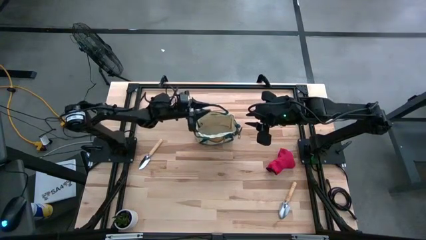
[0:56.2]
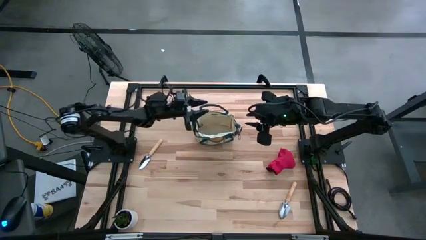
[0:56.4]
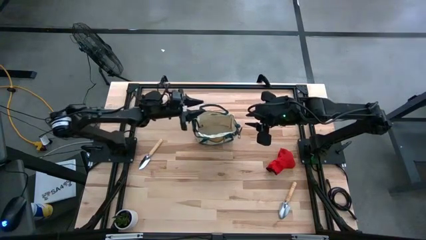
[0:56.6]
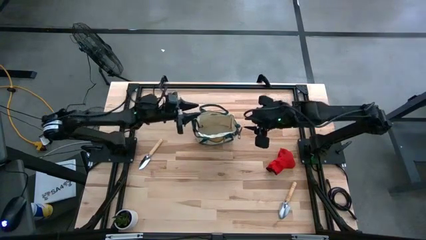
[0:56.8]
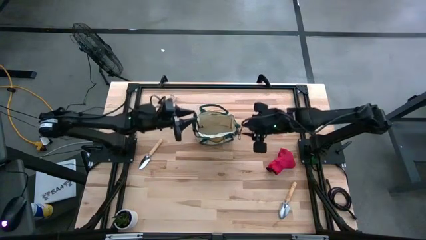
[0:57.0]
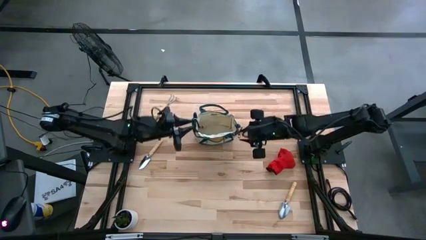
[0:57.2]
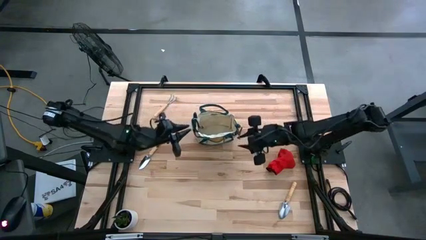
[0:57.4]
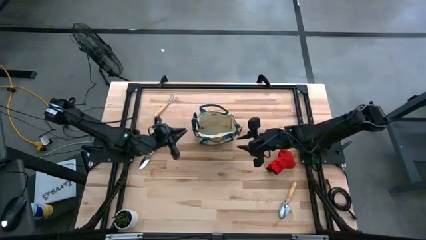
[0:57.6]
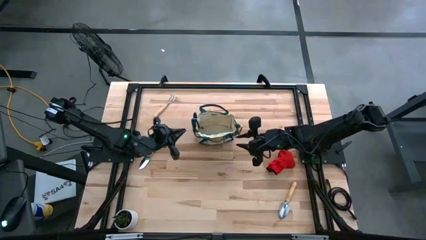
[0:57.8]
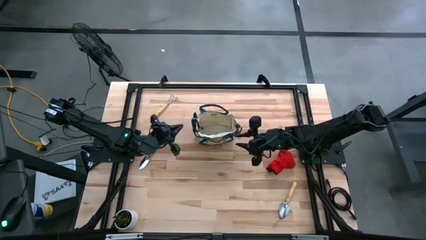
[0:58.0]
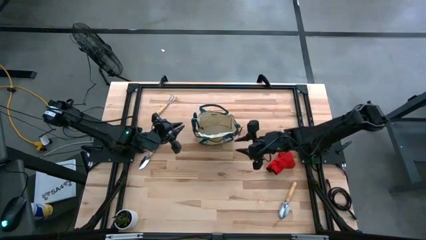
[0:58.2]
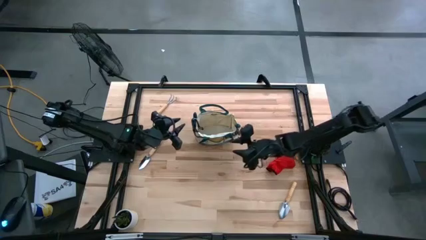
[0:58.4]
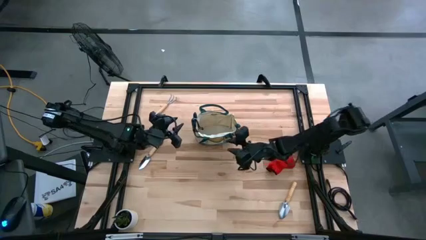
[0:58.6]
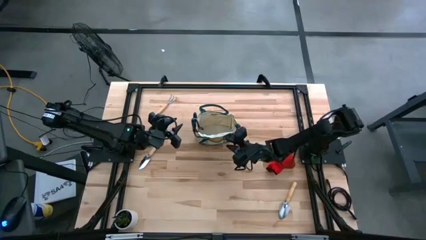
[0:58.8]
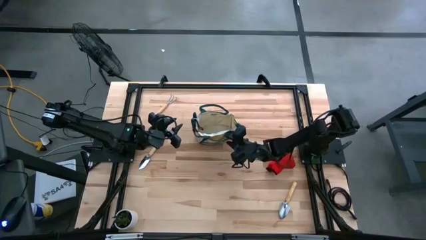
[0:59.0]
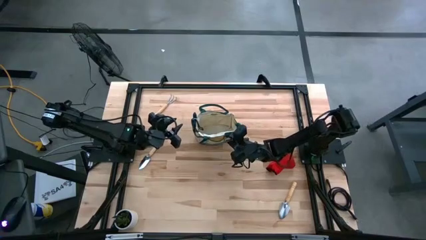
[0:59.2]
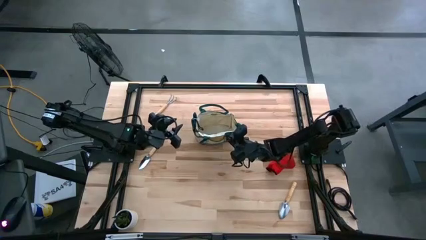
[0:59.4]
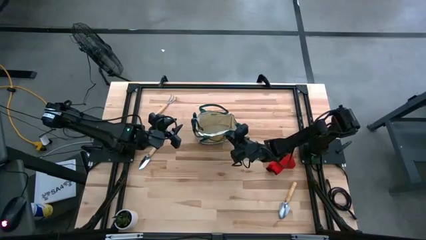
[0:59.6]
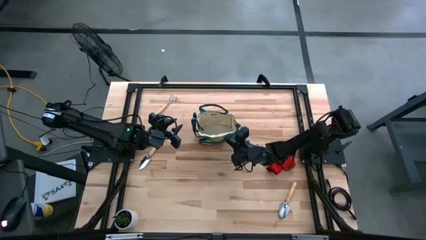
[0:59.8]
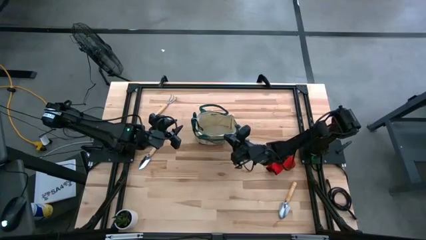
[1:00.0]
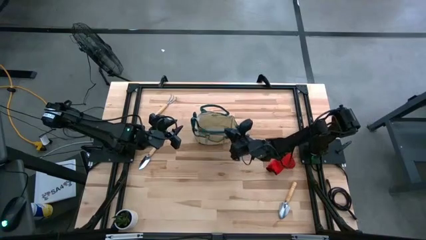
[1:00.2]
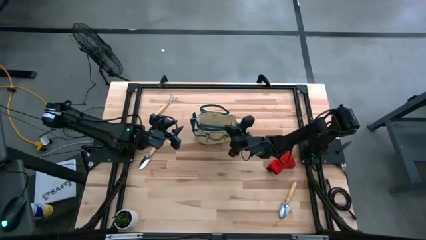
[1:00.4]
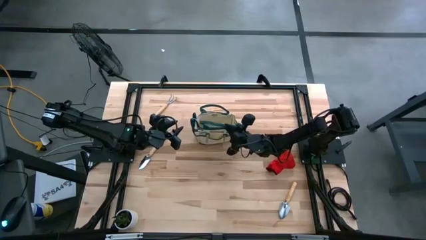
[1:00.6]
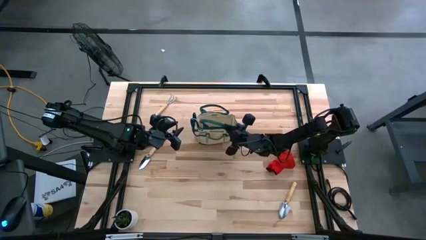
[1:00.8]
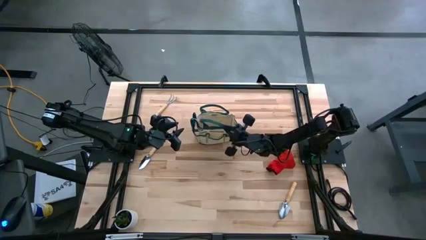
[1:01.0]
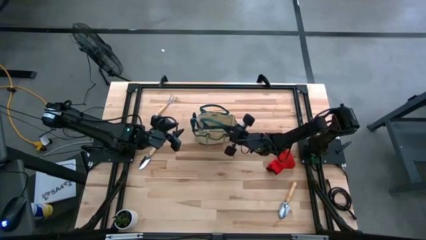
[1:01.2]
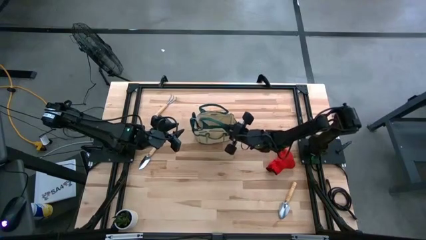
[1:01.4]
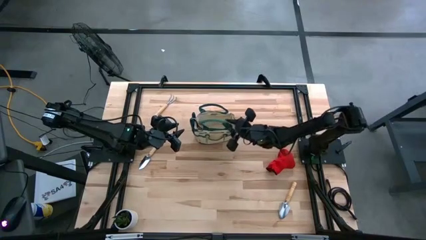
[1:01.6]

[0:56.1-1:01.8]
Task: Pick & Place Garden tools in Gardening bag
Adjust the gardening bag on the table

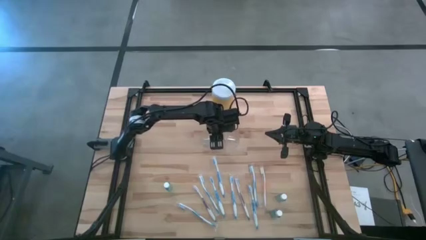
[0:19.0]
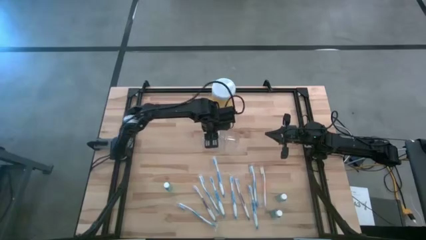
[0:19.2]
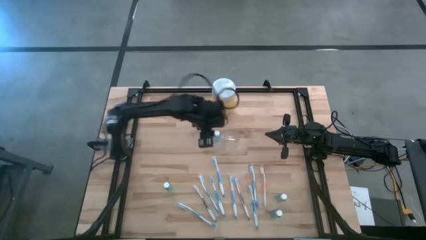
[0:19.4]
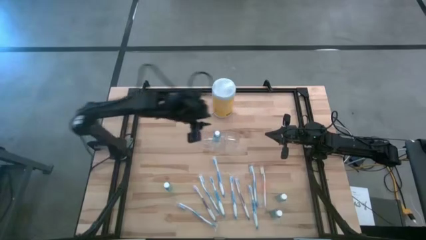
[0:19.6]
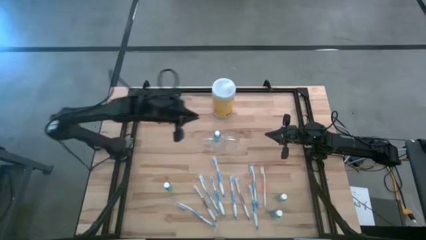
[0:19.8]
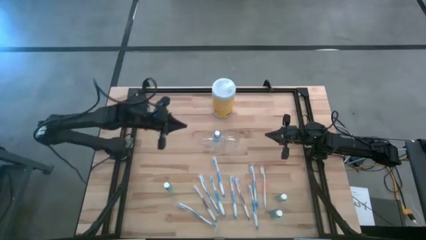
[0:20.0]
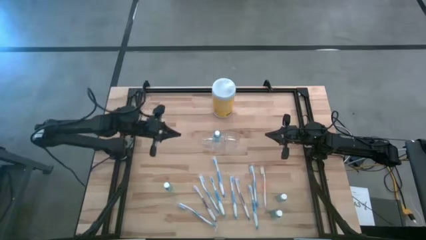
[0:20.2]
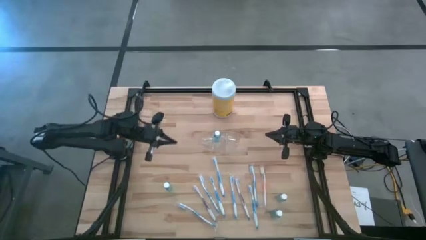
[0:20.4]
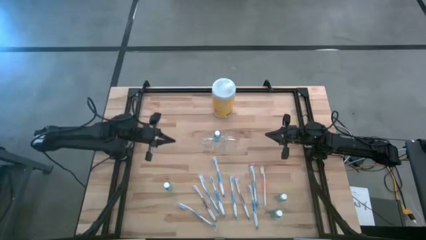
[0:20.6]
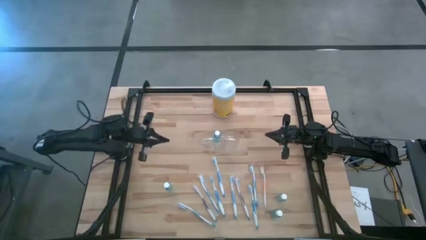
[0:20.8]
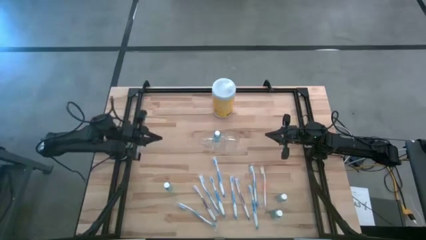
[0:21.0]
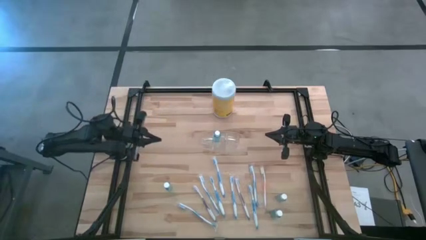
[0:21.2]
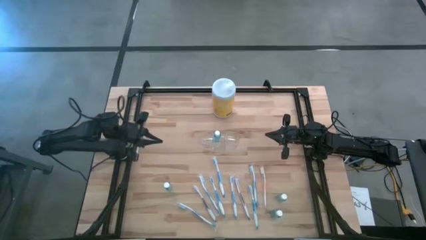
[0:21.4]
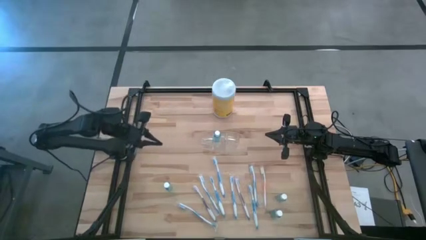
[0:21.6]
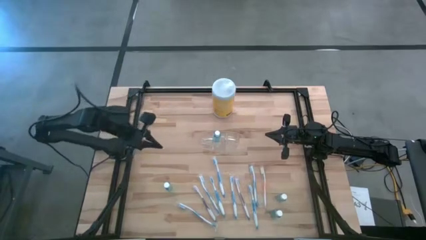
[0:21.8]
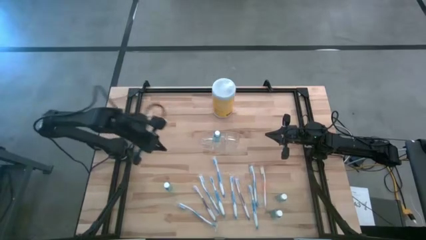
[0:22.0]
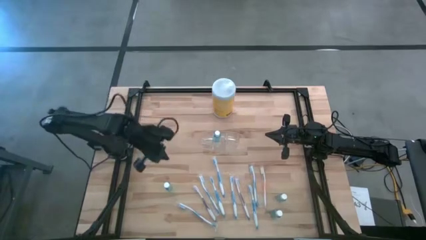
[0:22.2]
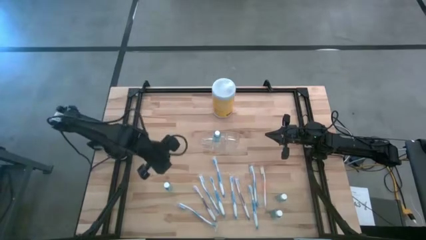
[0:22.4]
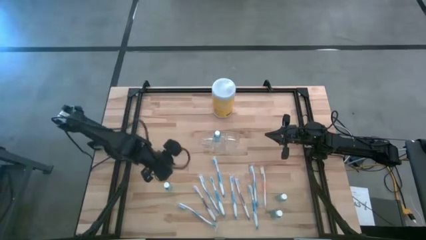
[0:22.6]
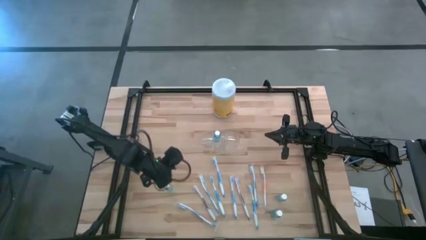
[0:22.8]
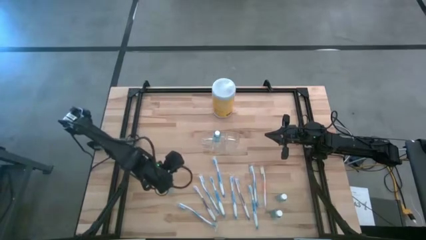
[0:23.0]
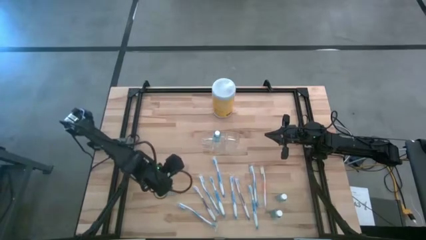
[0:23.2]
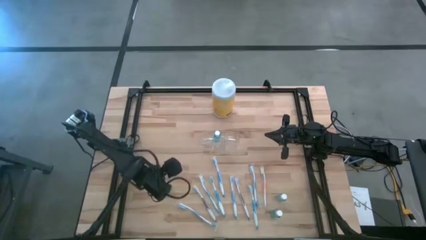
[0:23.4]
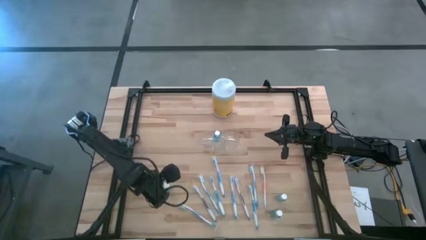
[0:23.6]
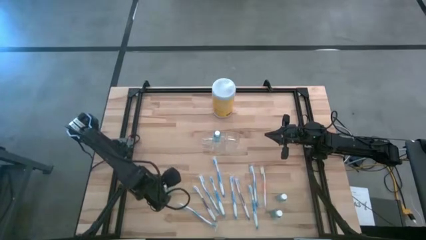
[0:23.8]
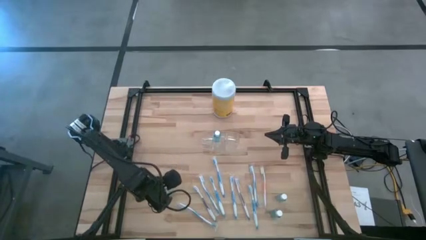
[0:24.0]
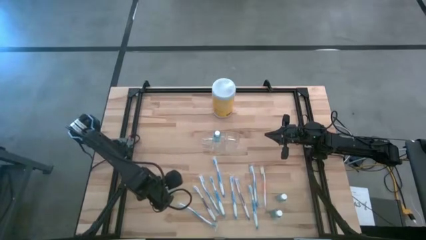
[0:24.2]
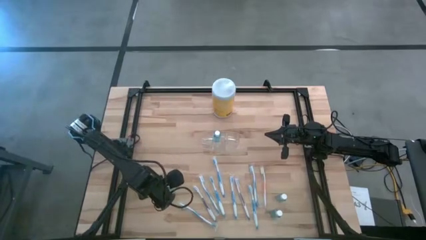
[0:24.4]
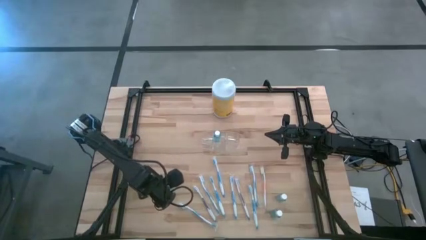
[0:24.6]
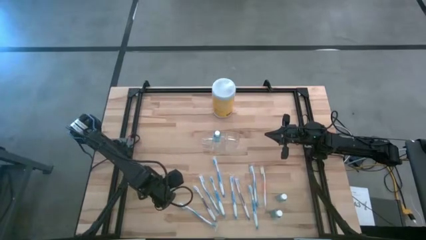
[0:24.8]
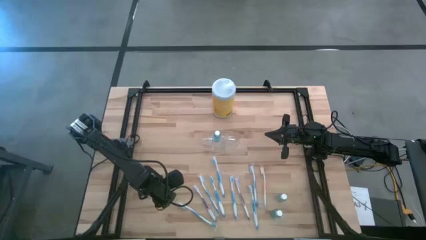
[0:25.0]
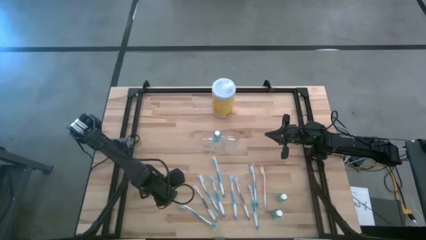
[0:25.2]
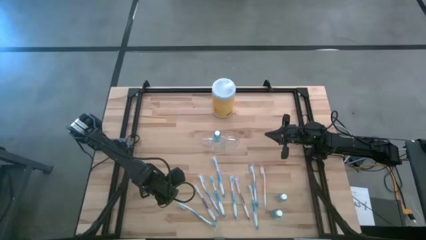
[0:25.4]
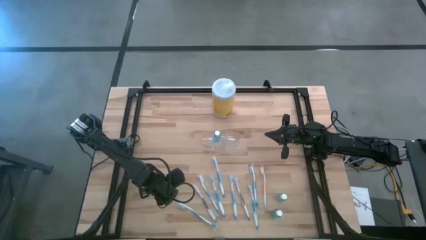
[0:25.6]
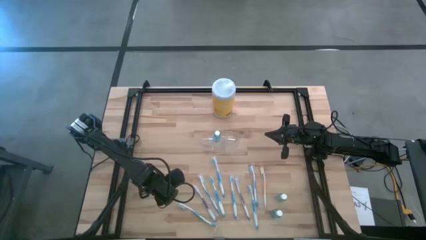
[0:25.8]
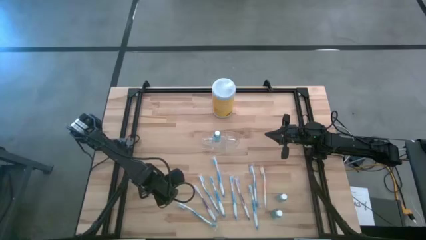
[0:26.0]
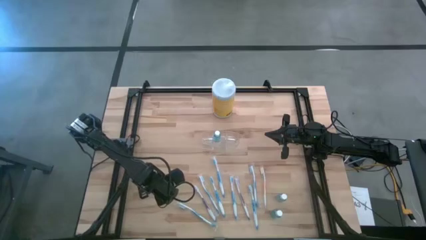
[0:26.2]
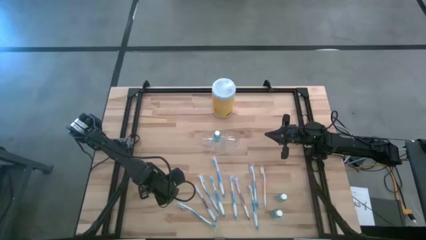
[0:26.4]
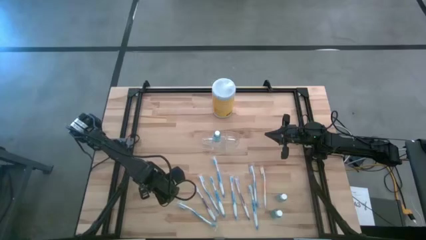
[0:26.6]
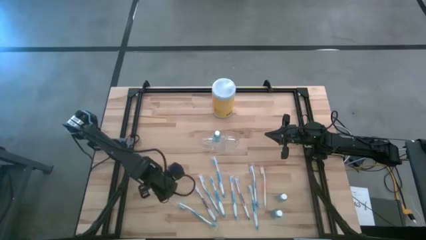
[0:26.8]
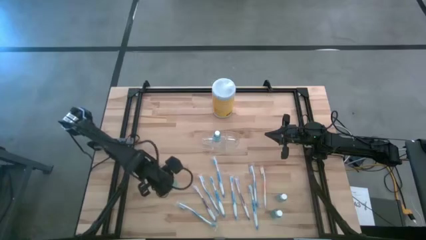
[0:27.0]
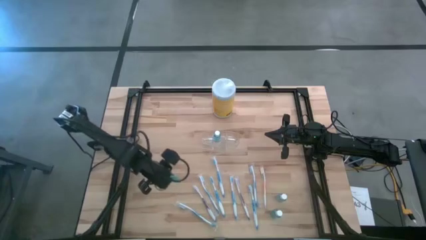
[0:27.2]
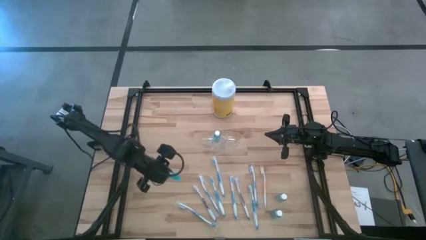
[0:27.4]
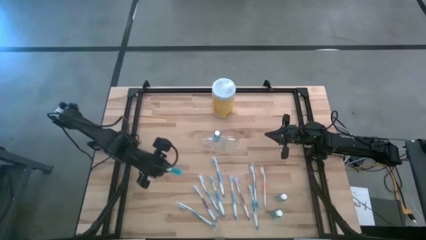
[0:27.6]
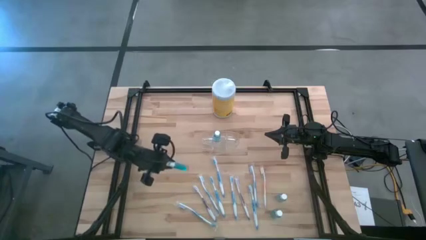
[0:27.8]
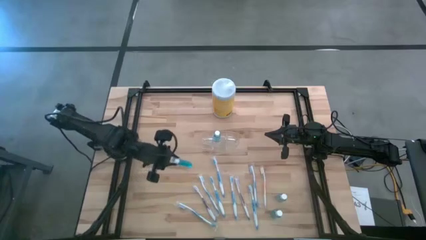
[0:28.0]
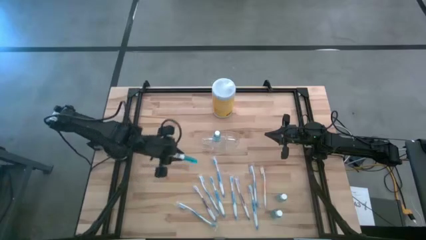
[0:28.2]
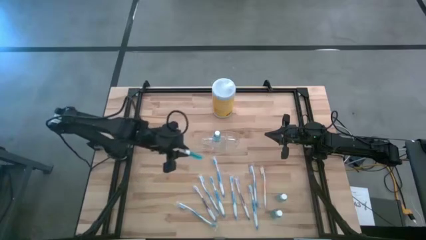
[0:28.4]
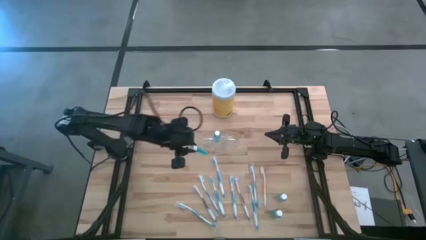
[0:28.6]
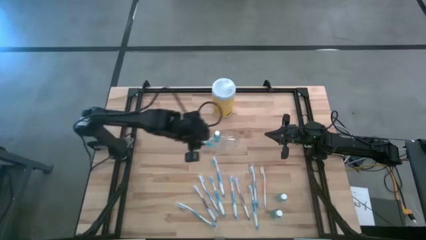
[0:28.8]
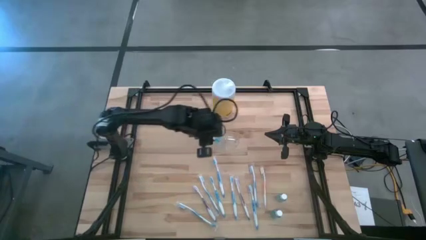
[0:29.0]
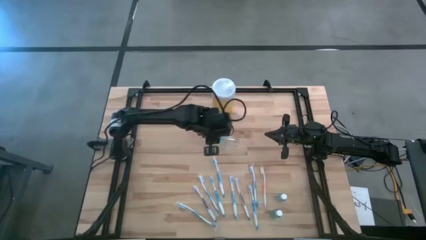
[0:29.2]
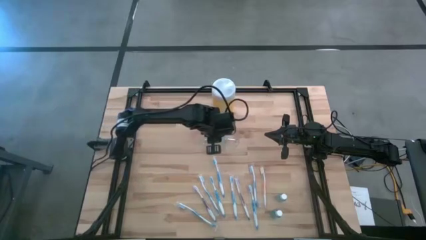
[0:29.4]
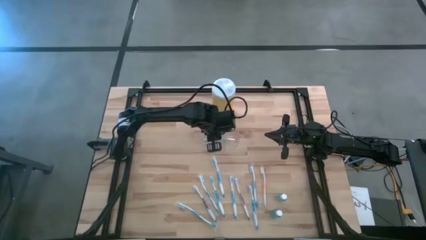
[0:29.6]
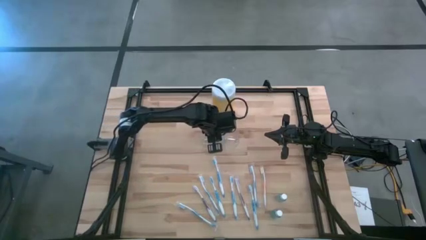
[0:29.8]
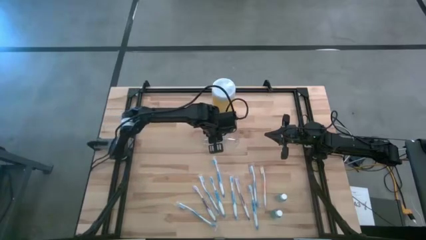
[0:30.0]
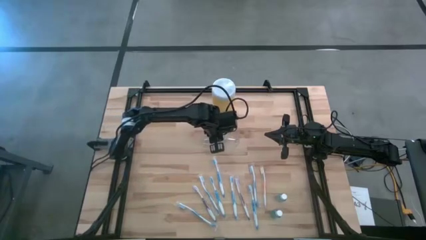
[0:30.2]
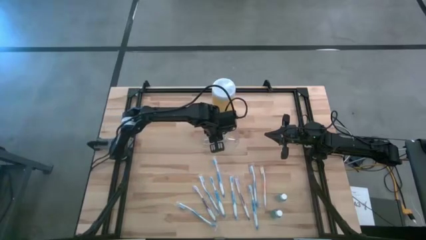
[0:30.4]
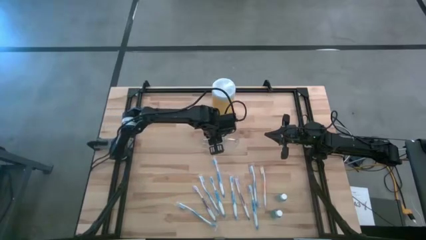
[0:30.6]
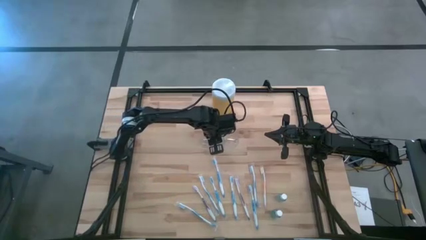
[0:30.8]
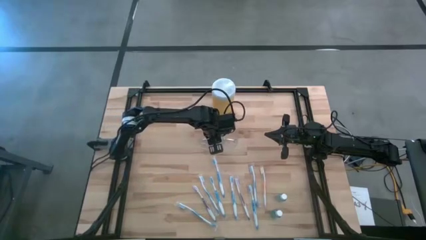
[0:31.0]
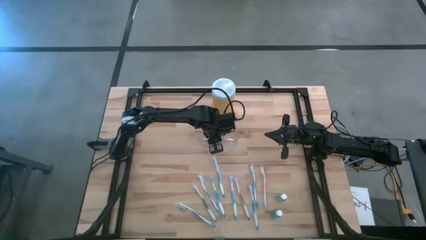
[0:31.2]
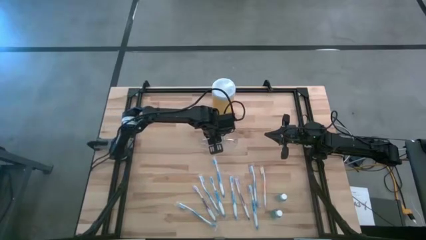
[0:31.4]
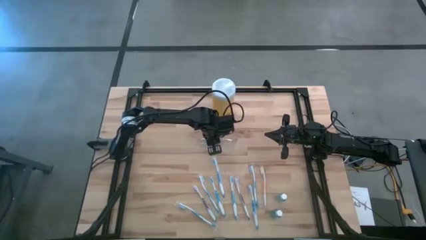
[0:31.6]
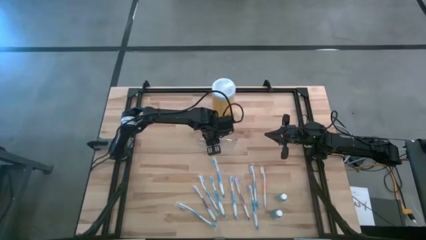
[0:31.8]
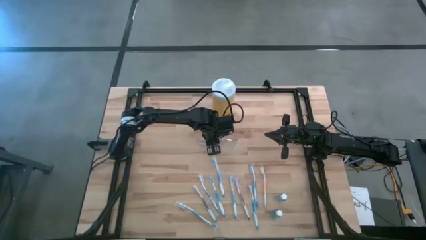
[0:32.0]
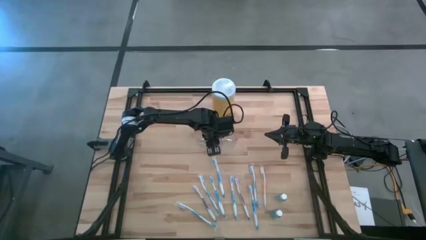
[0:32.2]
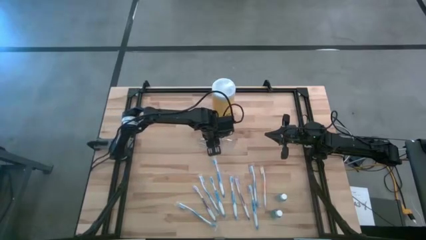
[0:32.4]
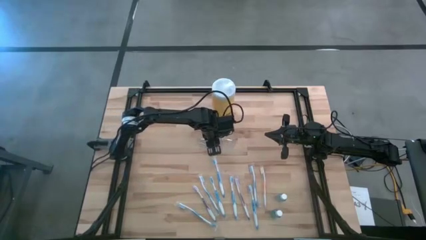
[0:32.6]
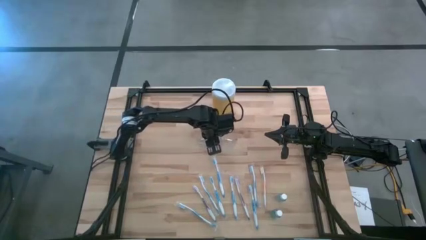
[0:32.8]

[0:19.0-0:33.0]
Task: Pick & Place toothbrushing station
Put the blue mouthwash into the transparent organizer
